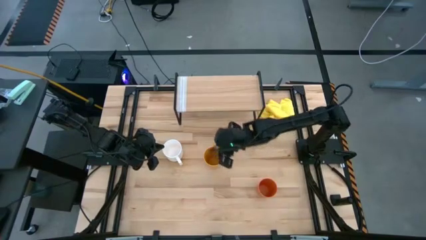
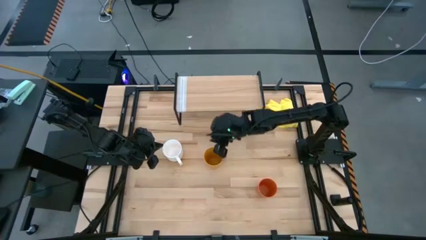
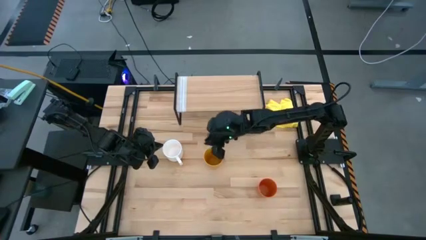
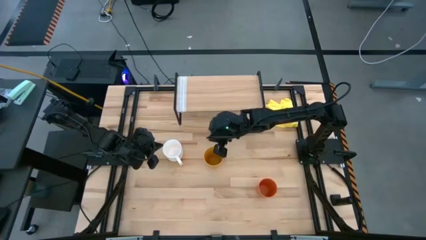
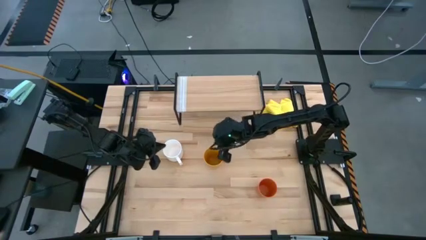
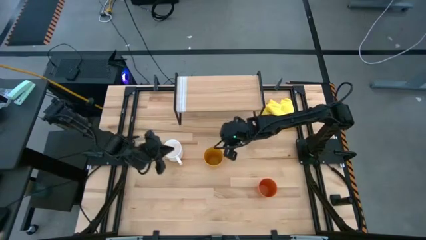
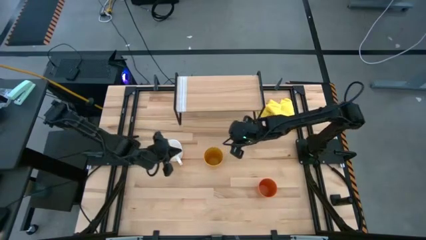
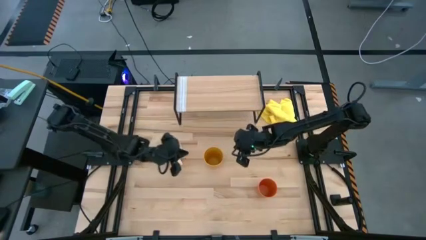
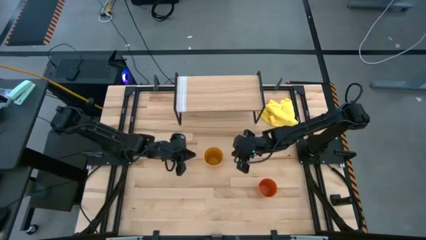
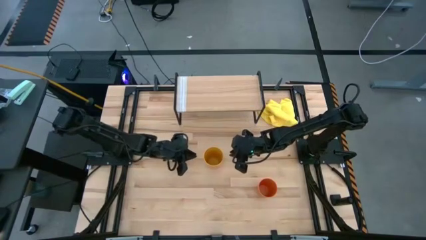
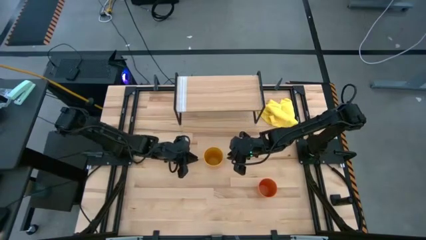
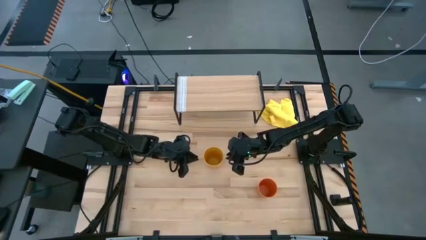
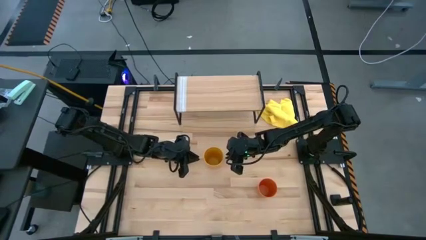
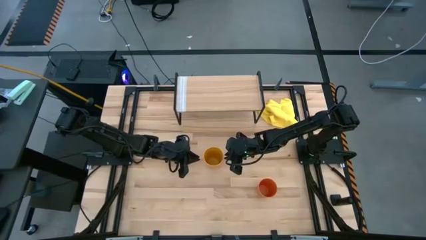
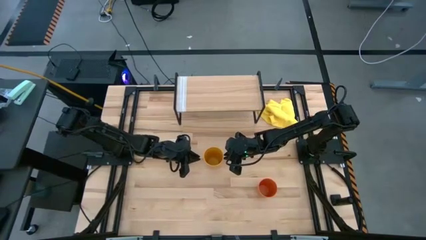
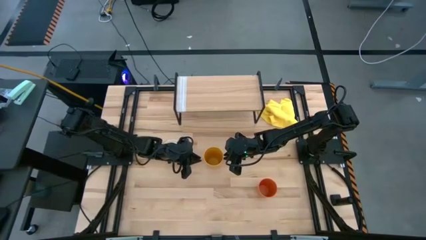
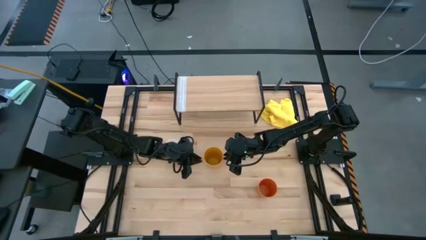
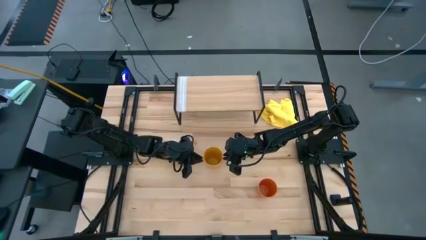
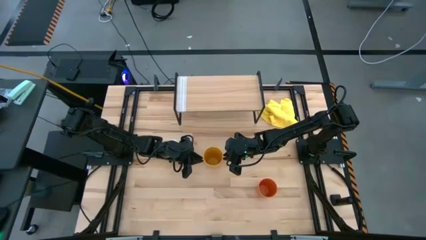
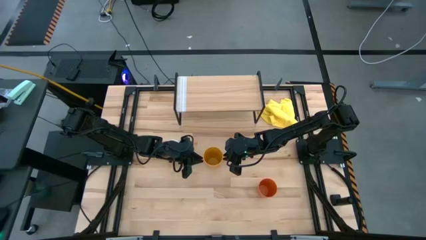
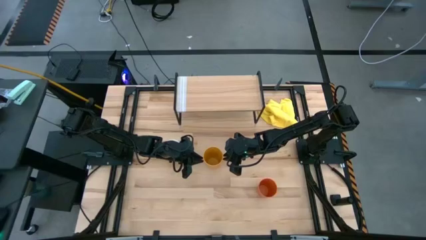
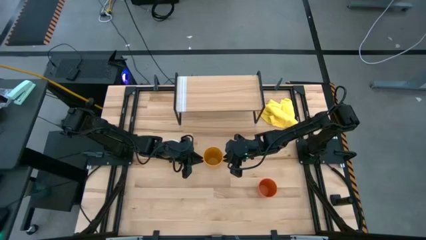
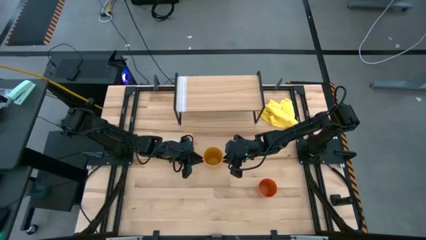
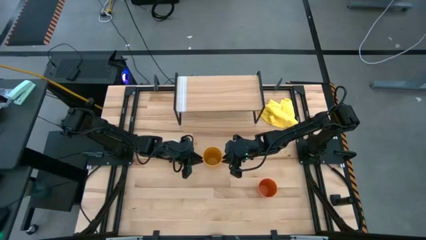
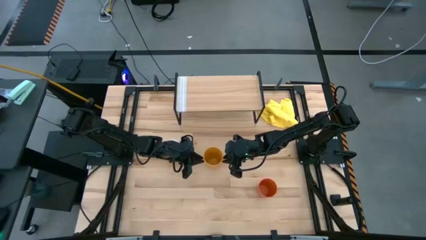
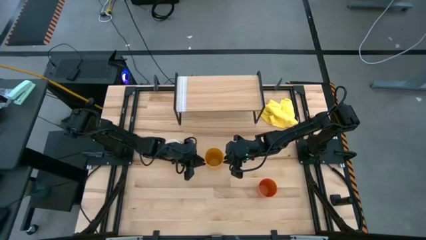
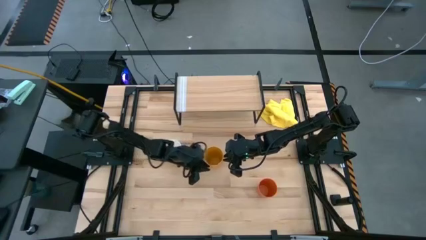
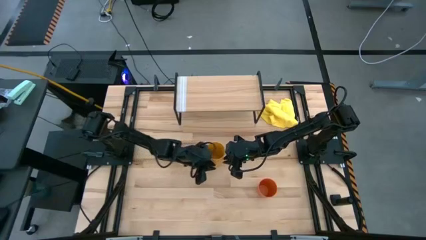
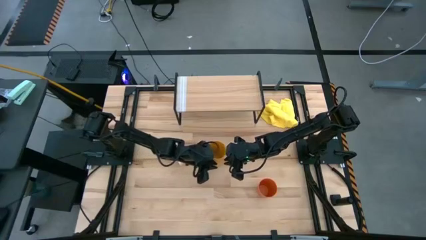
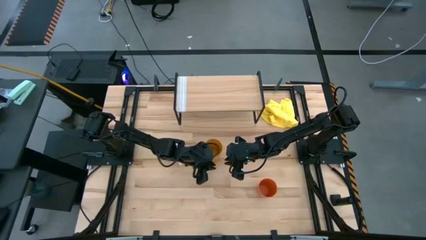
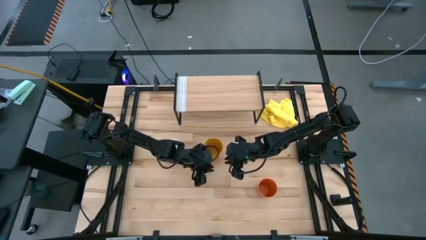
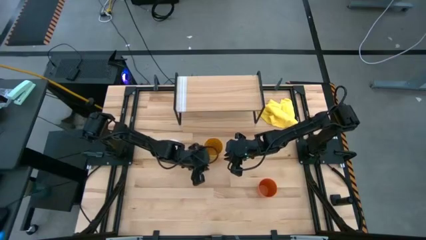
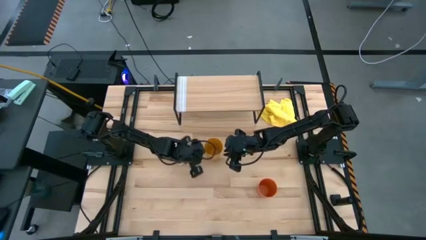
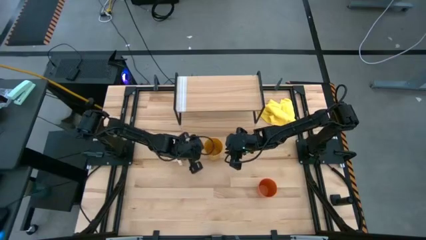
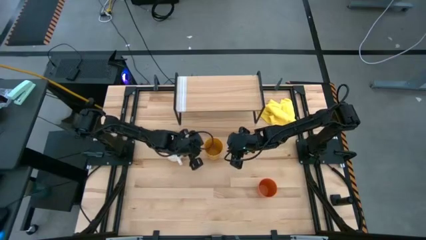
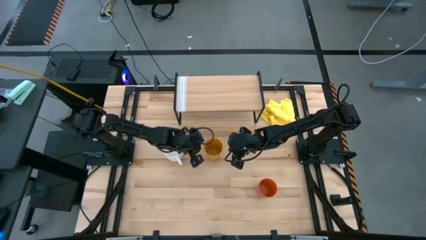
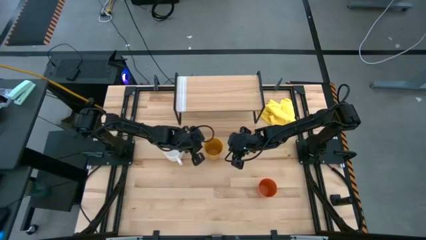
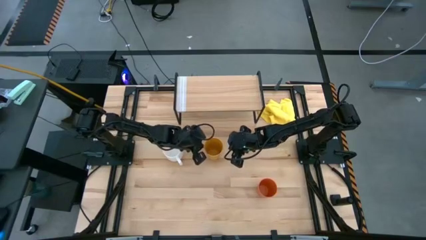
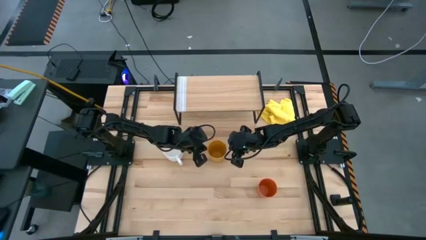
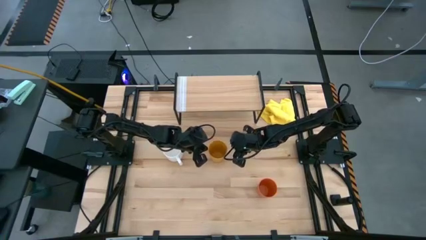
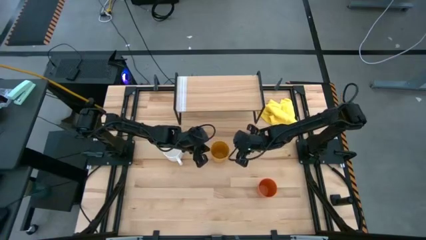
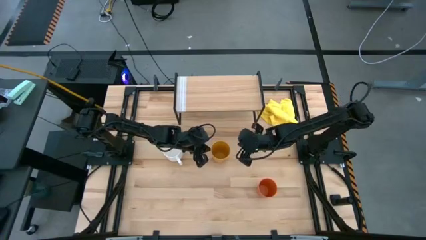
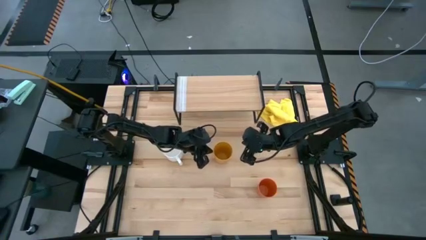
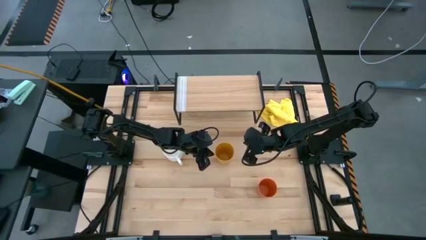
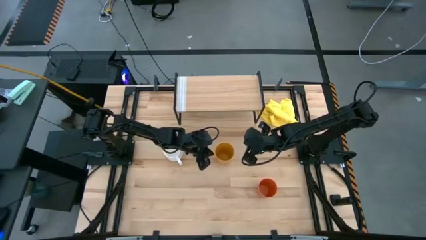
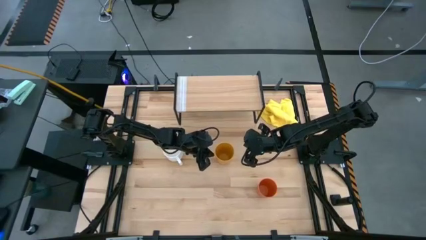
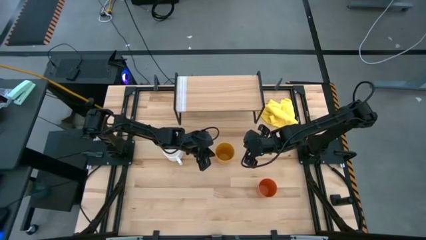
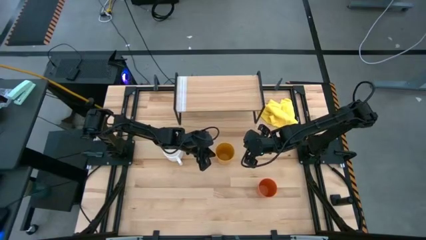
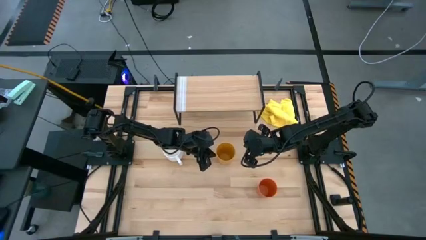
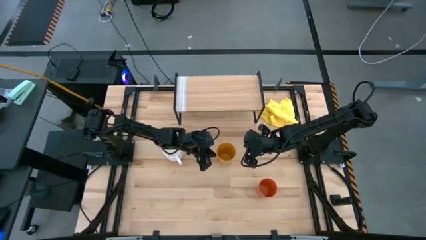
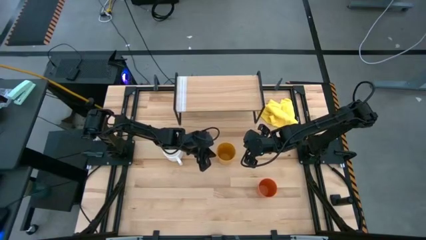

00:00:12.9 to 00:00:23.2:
Task: Stack small to large cups/mugs on shelf
Put the yellow cup on the shelf
